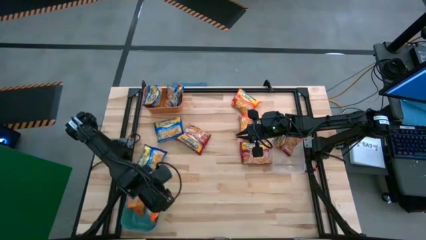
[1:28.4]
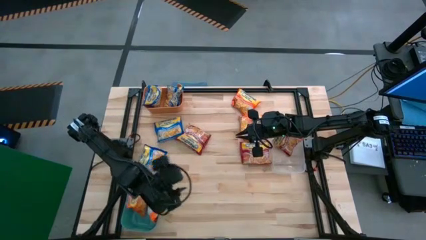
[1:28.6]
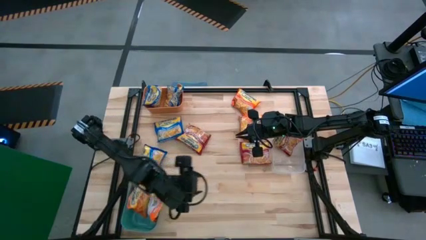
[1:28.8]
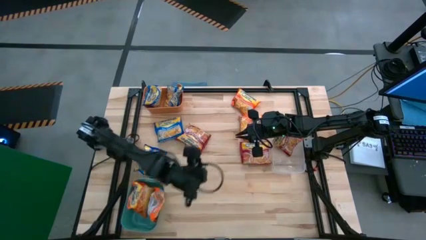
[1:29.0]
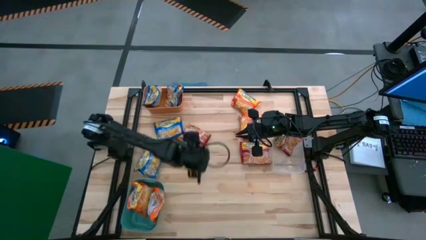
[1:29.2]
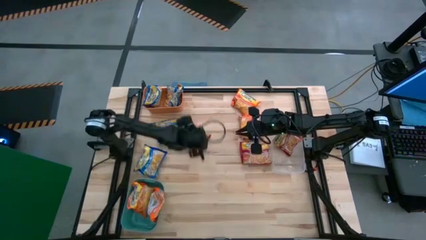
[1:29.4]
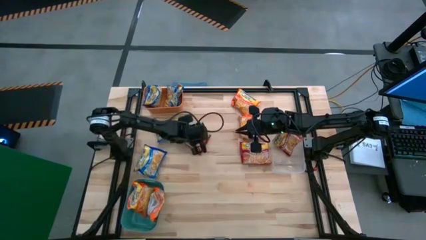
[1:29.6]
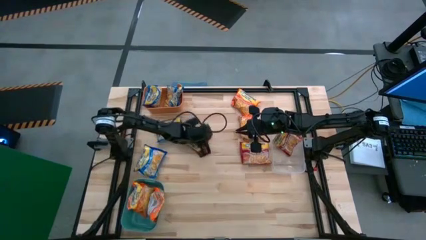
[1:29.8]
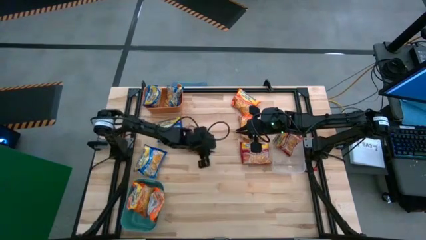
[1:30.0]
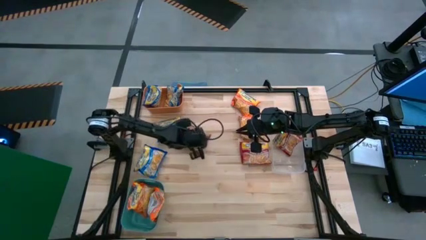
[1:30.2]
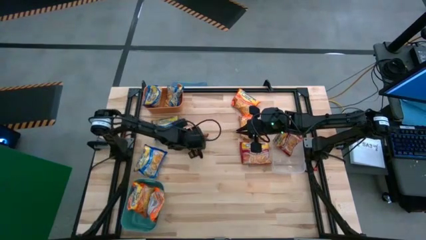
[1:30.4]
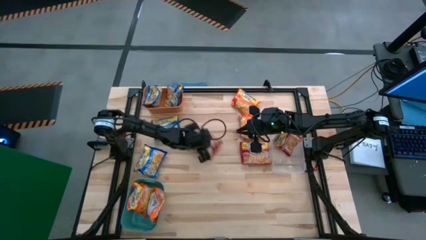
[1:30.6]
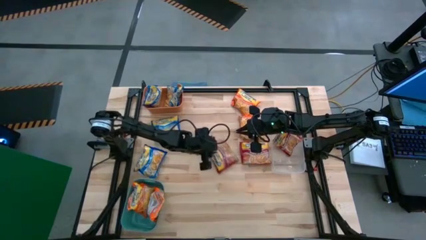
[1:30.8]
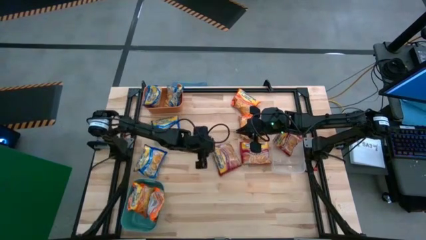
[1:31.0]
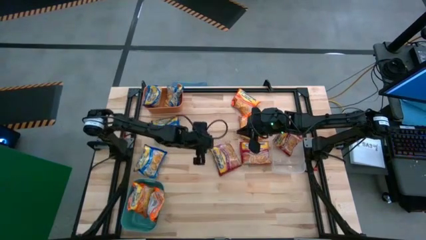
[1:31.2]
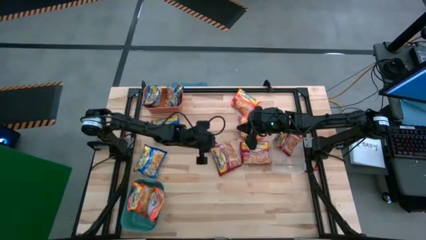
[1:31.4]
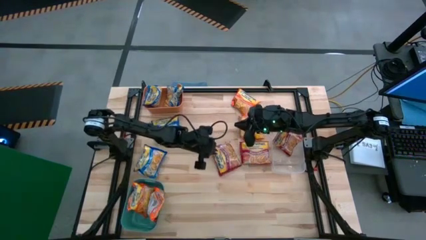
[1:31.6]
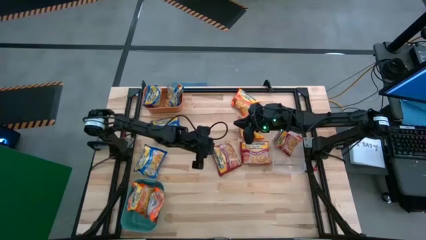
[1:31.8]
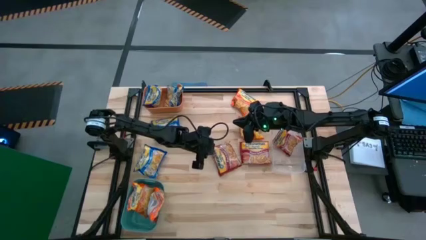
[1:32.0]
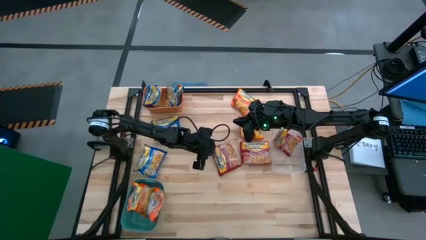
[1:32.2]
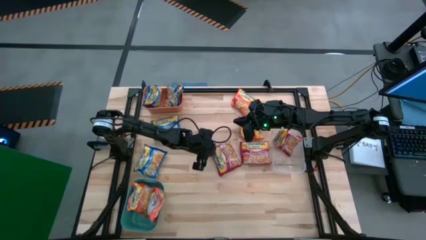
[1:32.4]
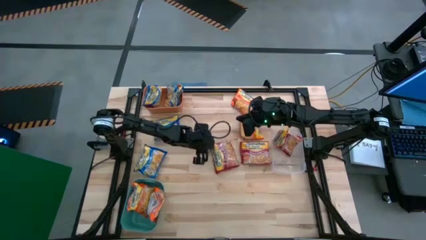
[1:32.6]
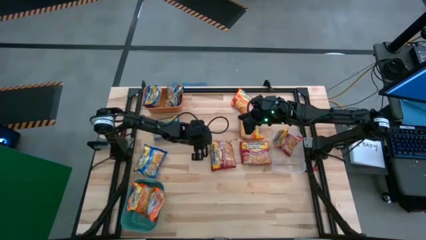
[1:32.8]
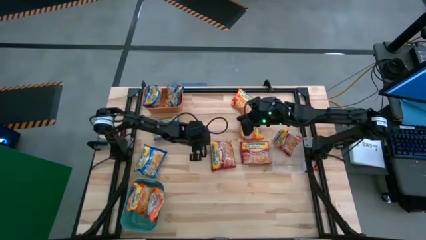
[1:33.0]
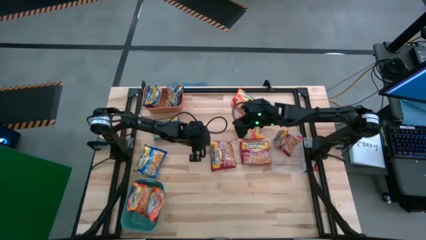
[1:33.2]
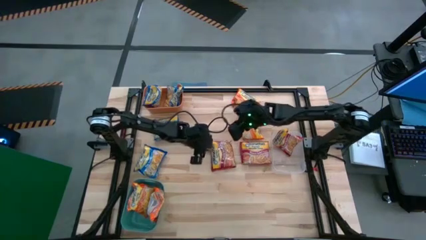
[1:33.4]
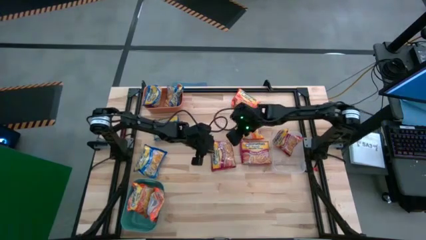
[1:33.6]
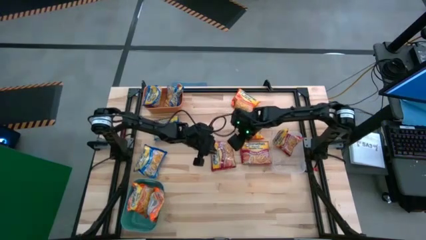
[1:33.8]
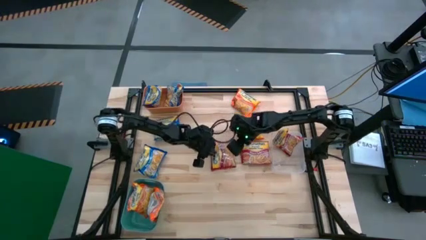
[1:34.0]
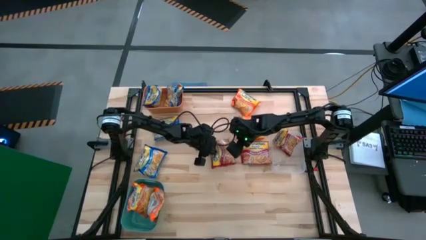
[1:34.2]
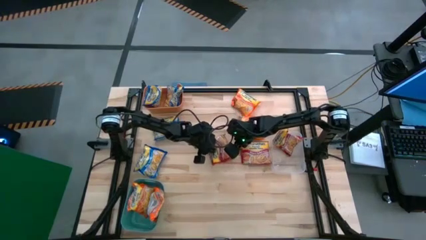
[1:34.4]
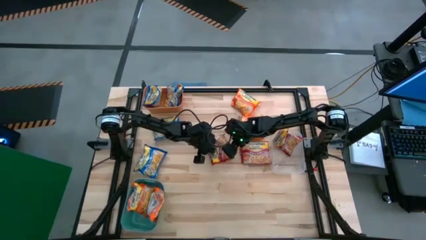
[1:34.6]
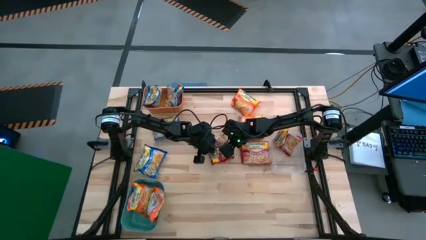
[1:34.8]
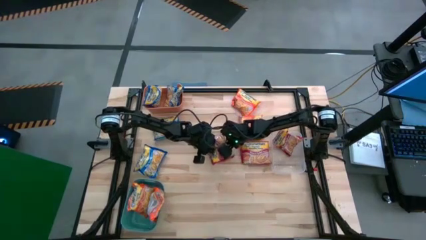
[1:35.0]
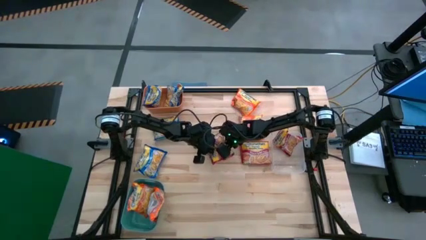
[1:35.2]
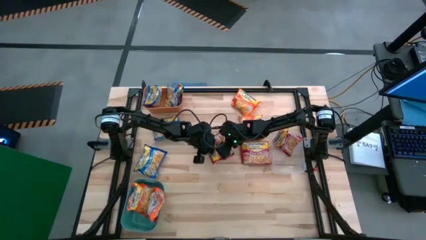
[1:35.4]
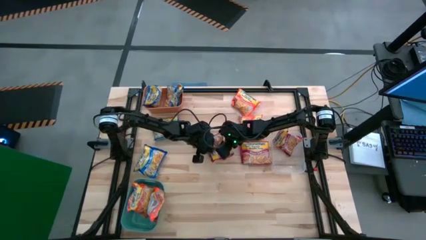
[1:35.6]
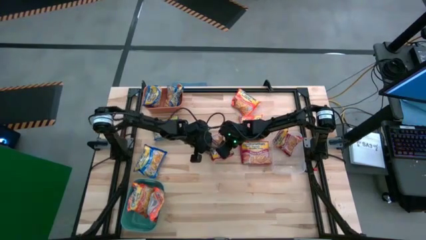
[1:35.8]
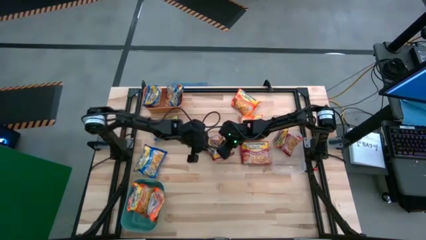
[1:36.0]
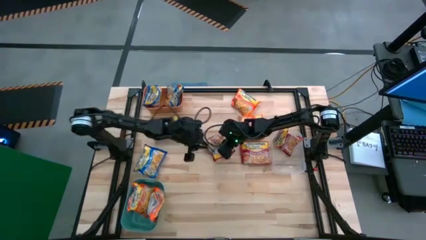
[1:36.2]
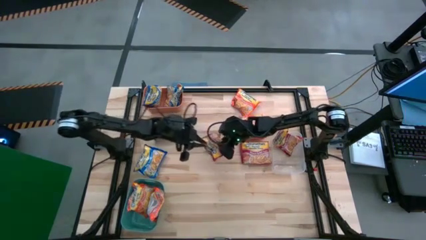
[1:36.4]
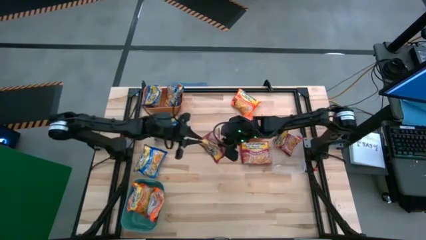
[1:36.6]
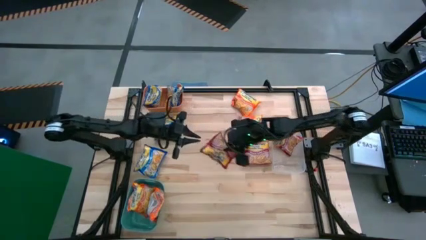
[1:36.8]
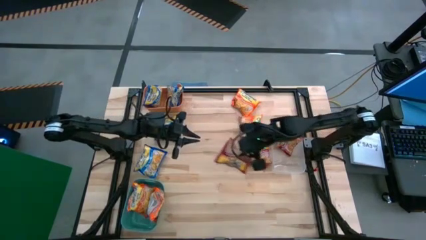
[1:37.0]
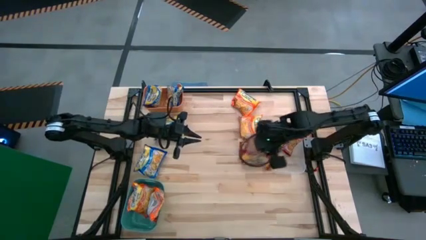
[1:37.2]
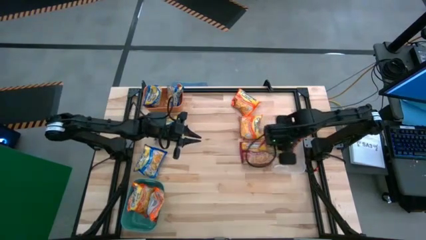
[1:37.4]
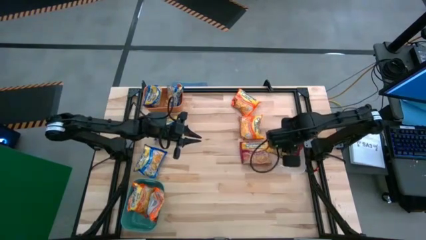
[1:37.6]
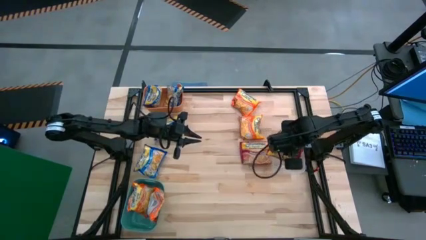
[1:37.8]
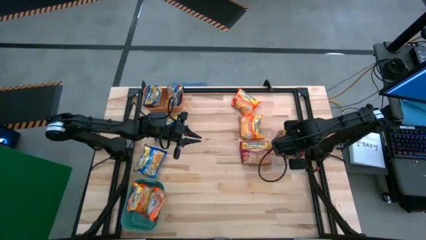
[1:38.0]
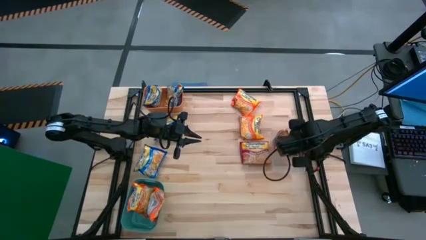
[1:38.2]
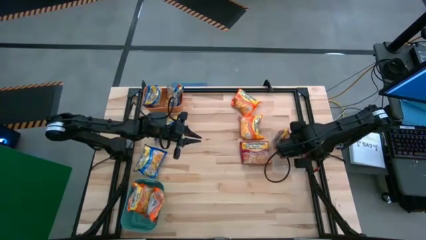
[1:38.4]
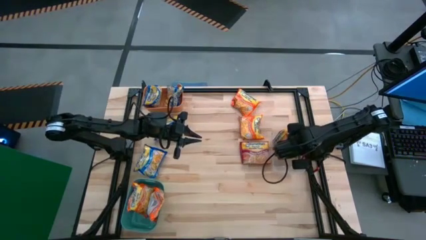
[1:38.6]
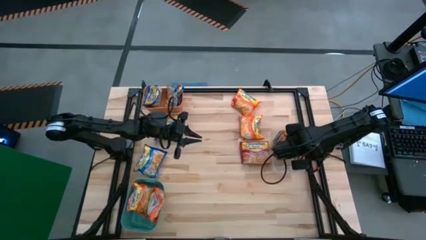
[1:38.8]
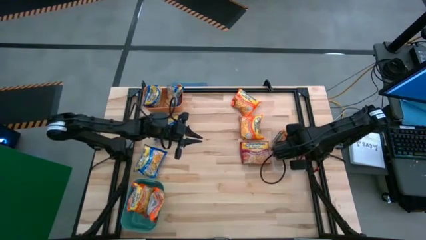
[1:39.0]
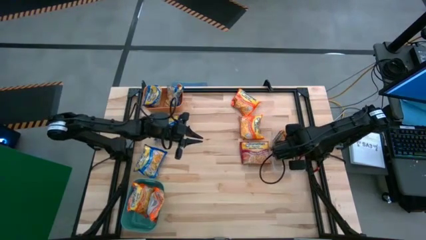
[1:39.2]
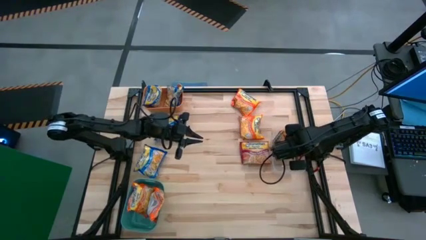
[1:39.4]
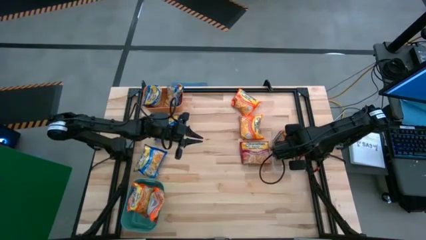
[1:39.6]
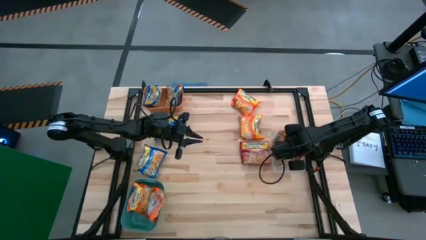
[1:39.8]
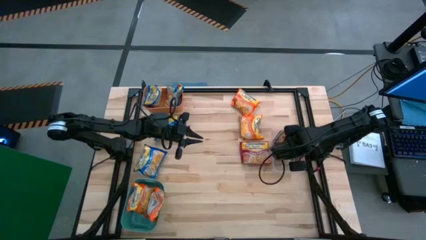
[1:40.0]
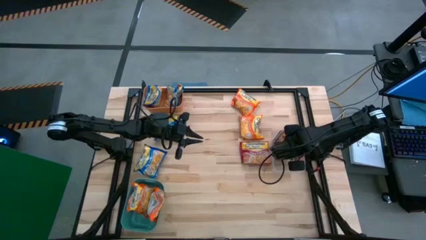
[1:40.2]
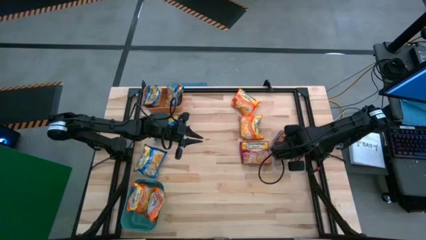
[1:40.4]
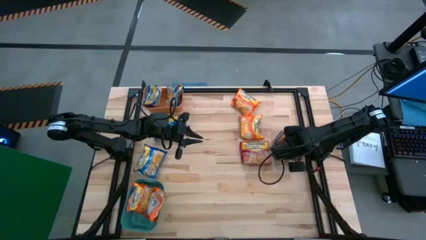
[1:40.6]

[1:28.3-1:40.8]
Task: Sort Maruchan noodles
Put the red noodle pack into the transparent bin

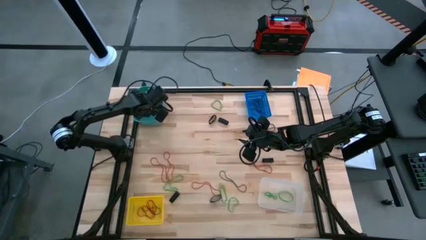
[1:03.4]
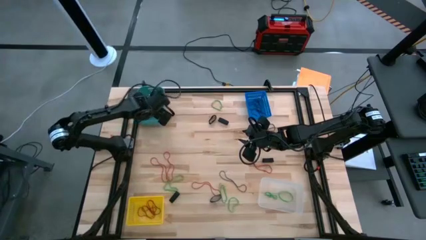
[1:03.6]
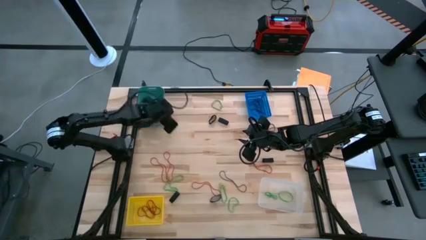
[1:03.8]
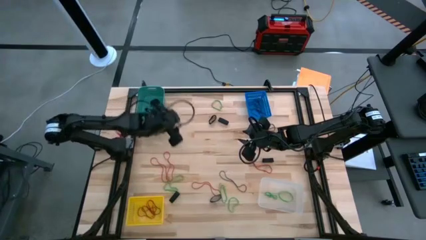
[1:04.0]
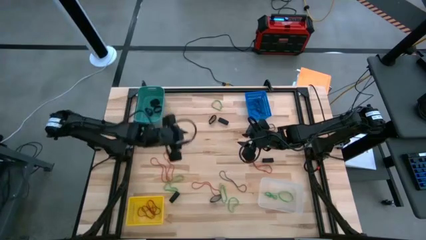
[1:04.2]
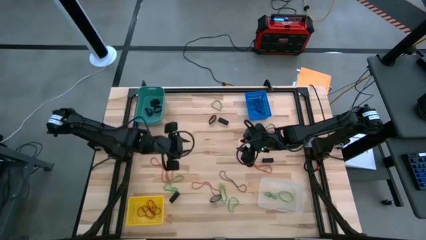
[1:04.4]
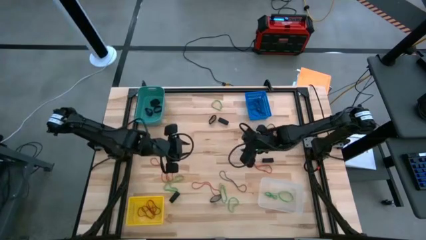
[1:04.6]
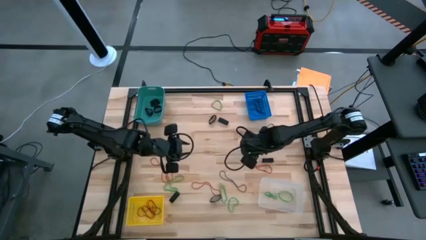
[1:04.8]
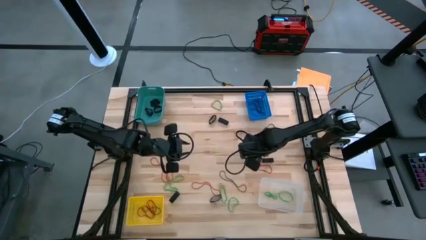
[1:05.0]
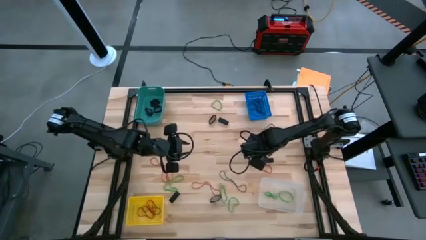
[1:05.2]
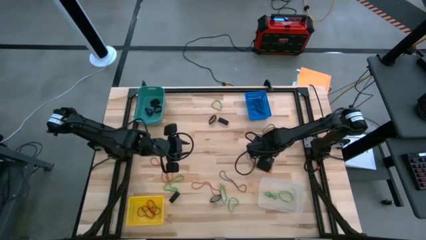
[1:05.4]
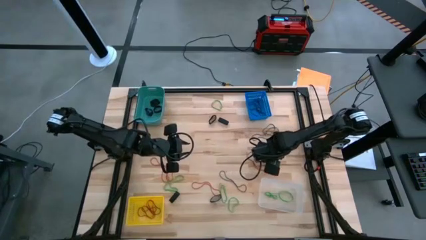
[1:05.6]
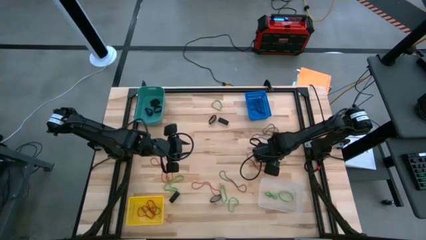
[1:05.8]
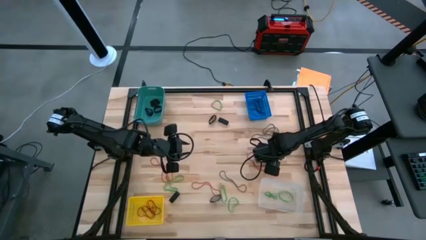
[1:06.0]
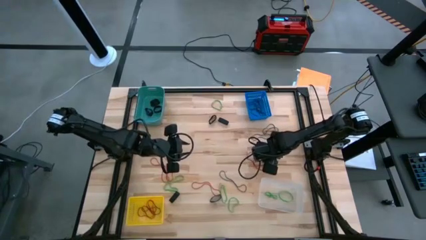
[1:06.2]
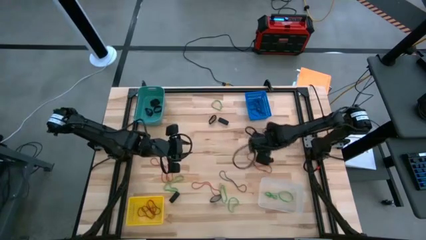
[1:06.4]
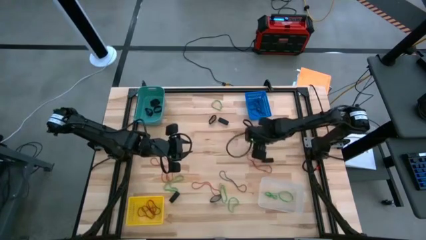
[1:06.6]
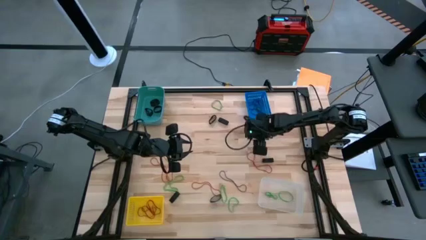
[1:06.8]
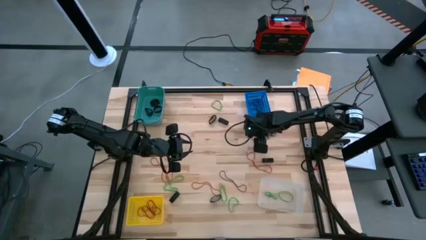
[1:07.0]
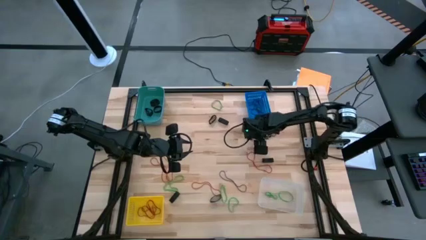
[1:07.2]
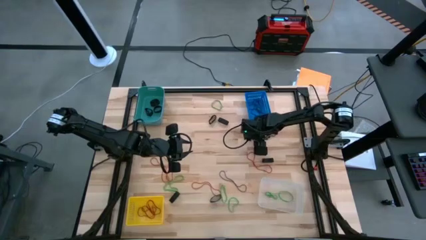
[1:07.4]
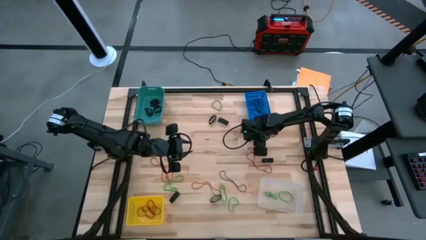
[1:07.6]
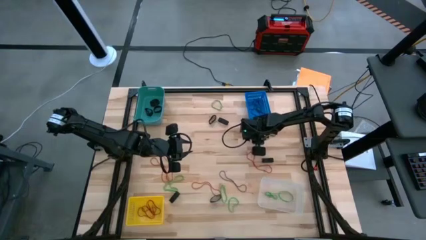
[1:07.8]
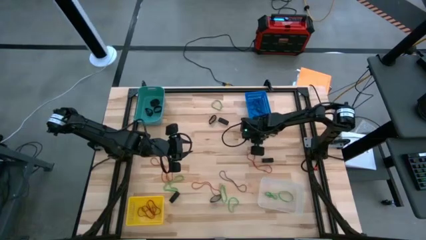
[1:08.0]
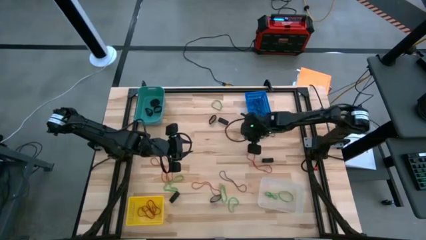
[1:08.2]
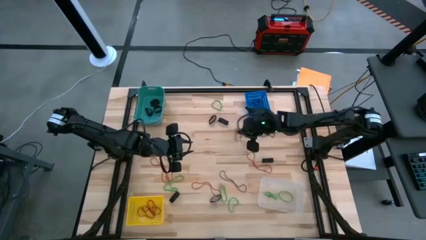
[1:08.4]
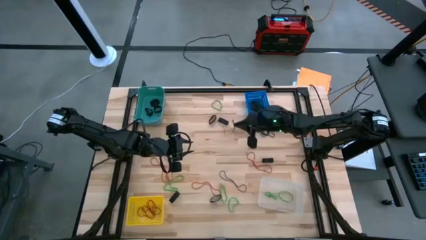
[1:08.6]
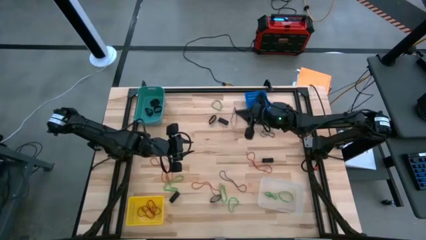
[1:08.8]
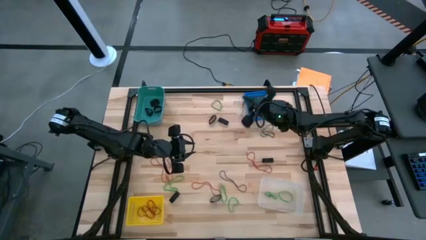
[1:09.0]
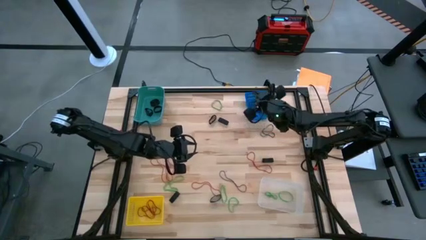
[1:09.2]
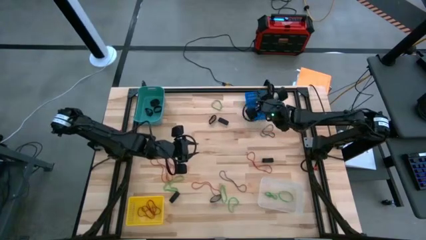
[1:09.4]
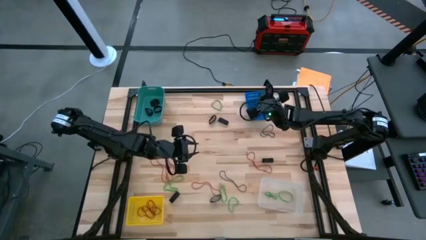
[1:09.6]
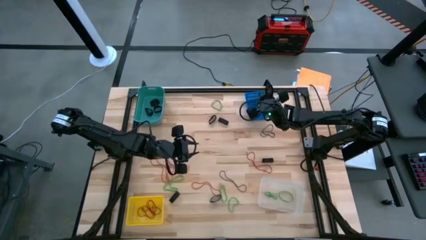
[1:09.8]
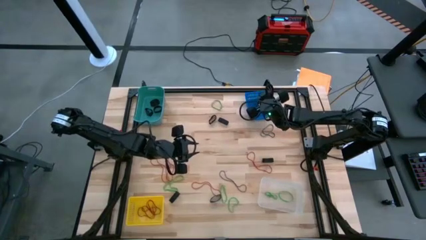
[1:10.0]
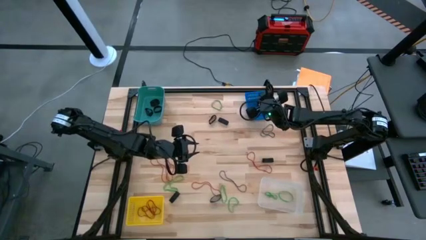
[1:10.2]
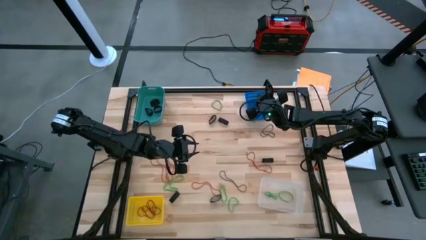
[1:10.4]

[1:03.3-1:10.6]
Task: Sort rubber bands into baskets
Put the thin black rubber band into the blue basket
